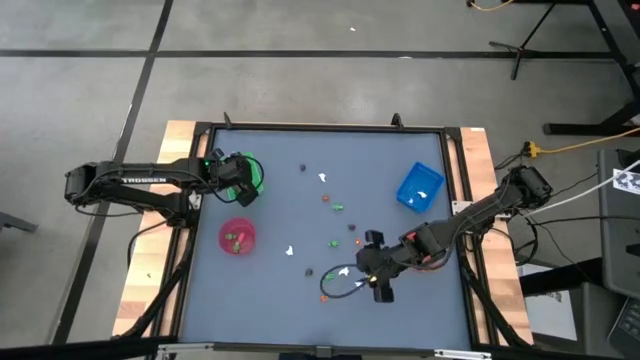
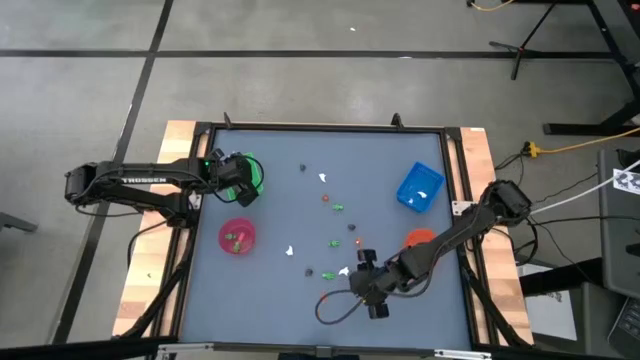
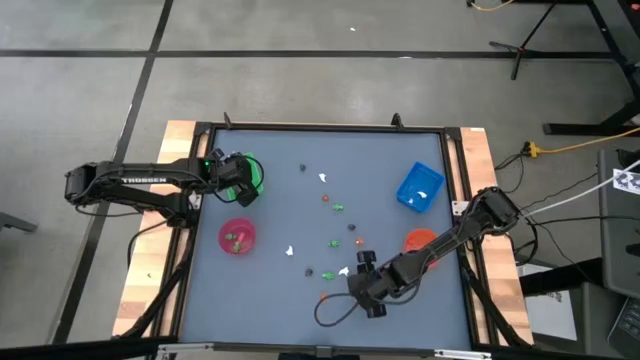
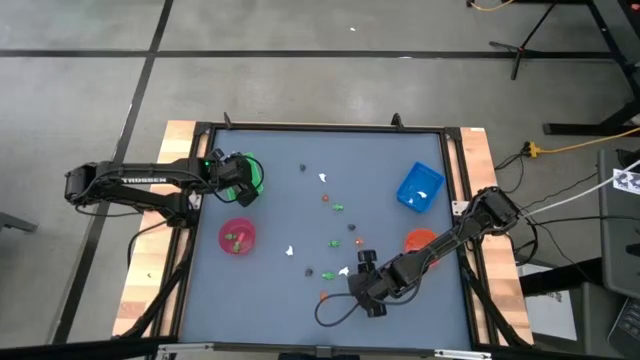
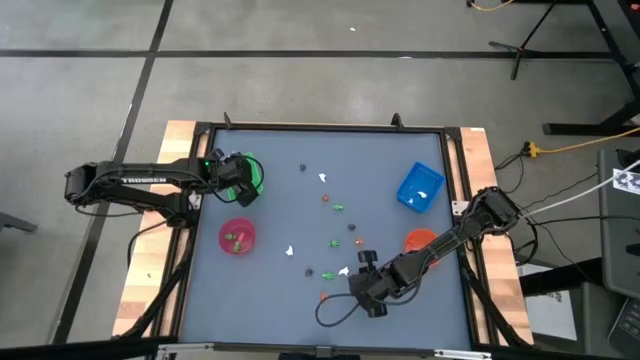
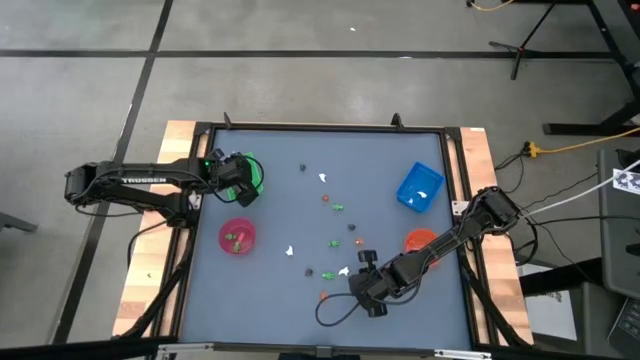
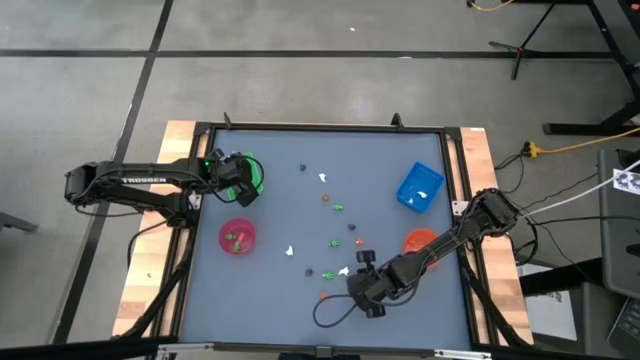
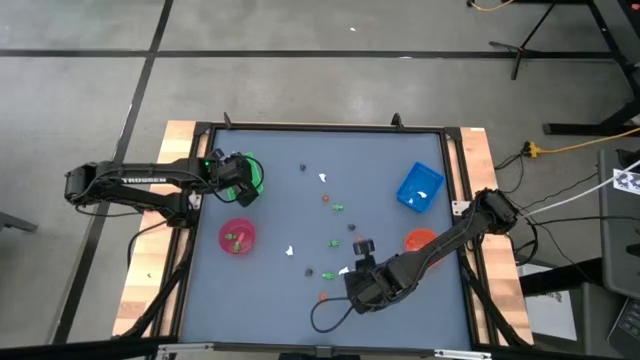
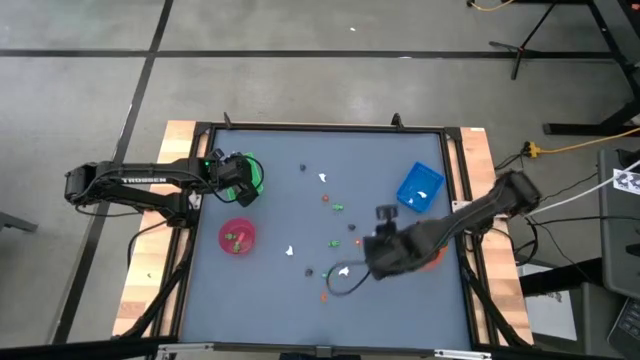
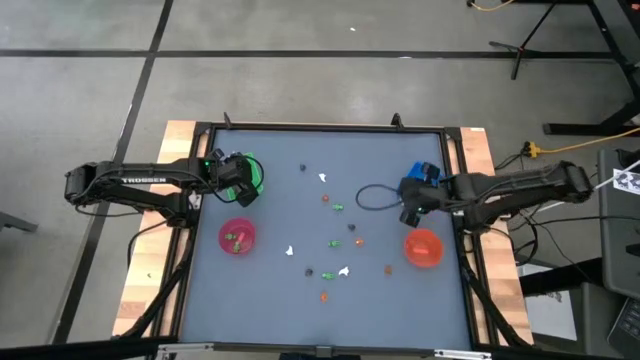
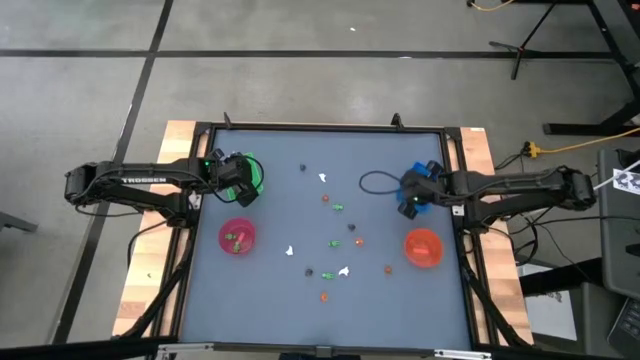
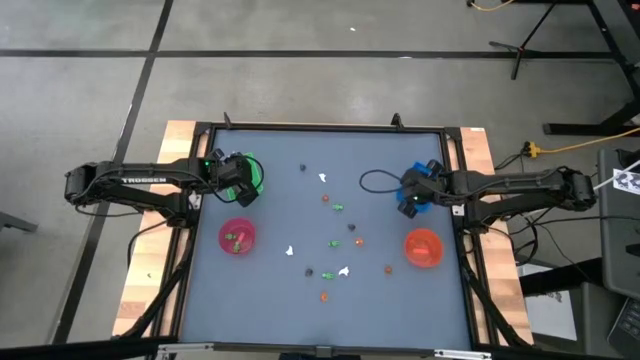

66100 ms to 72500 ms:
Task: Sort Halloween decoration
Put the small white ghost toy into the blue basket

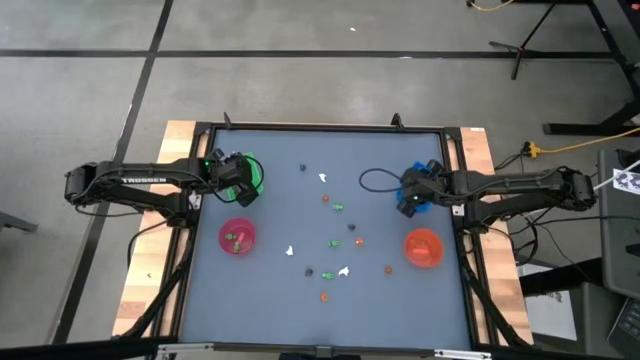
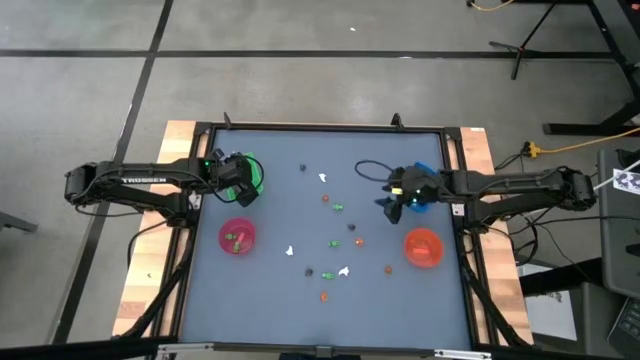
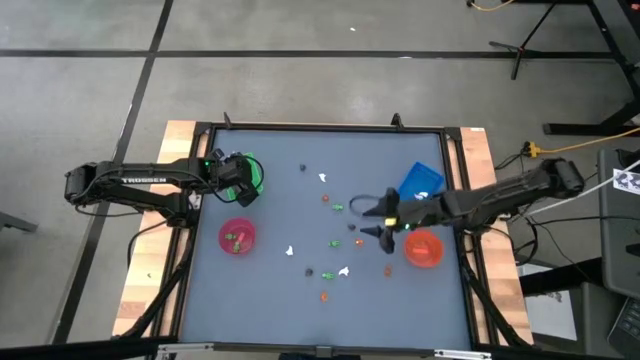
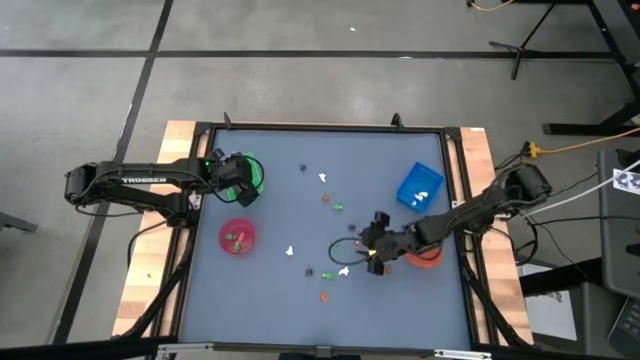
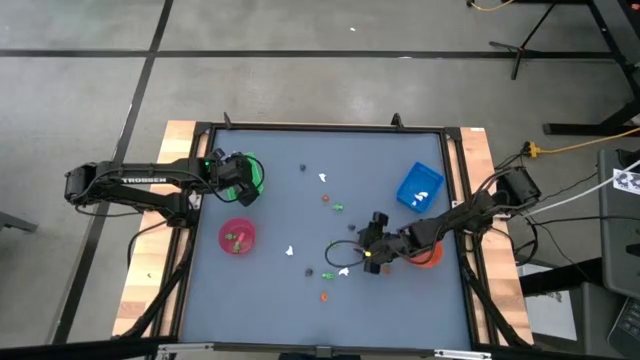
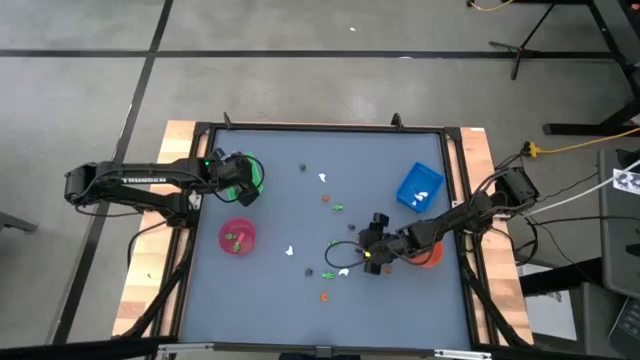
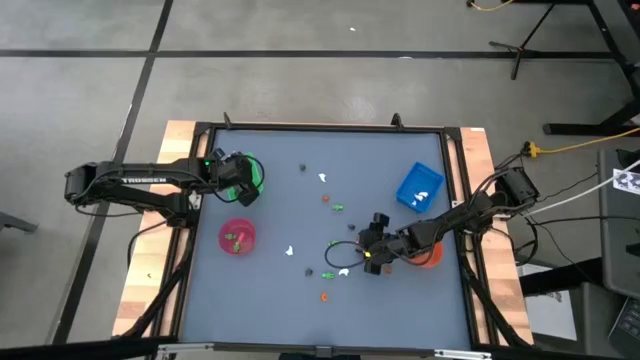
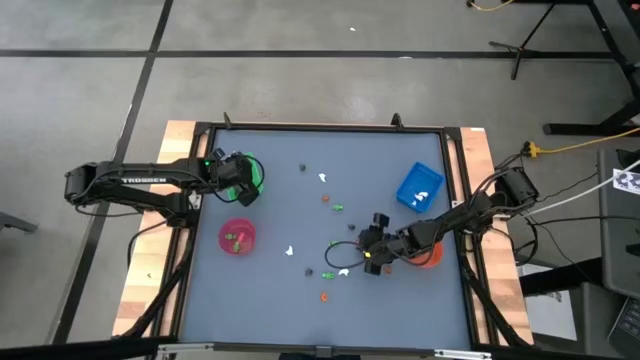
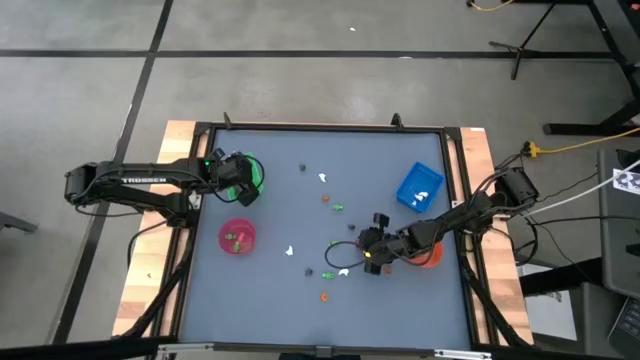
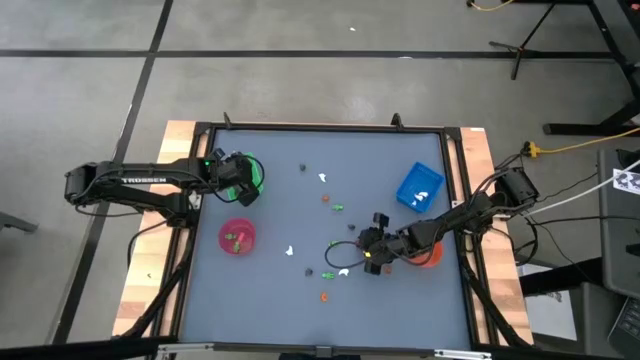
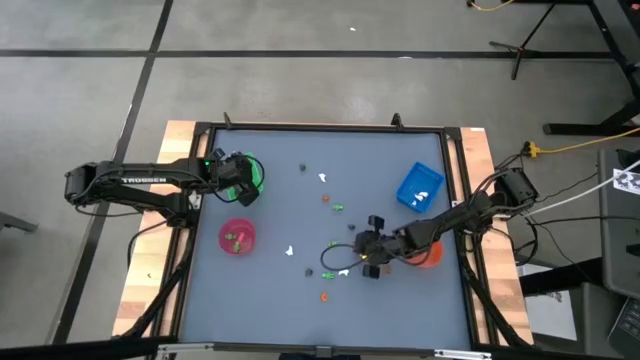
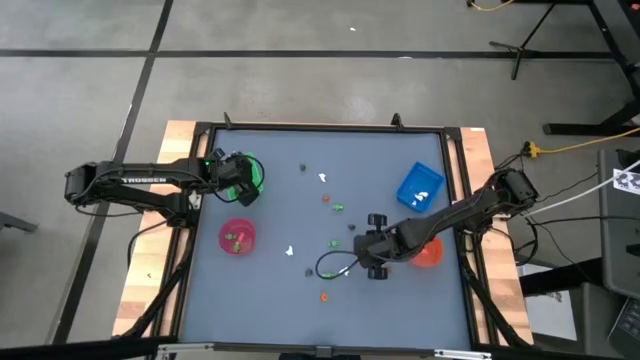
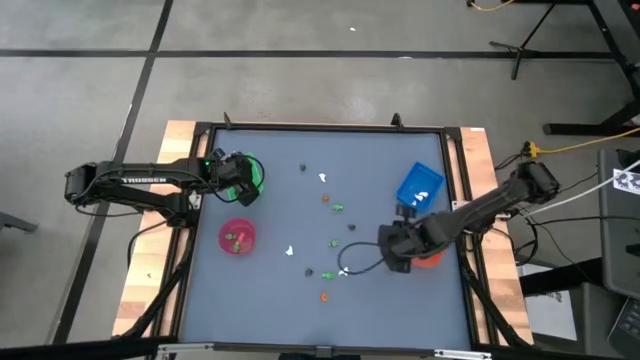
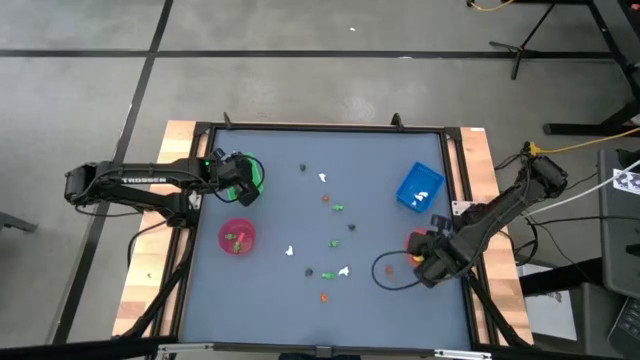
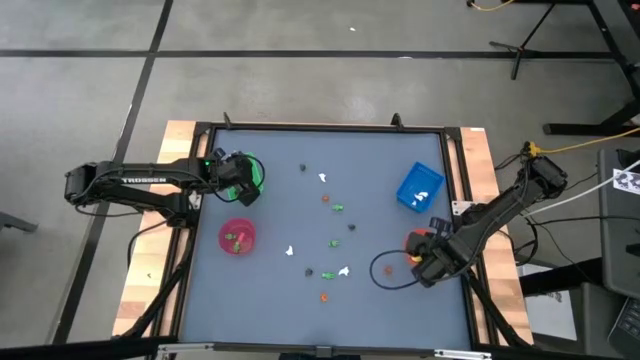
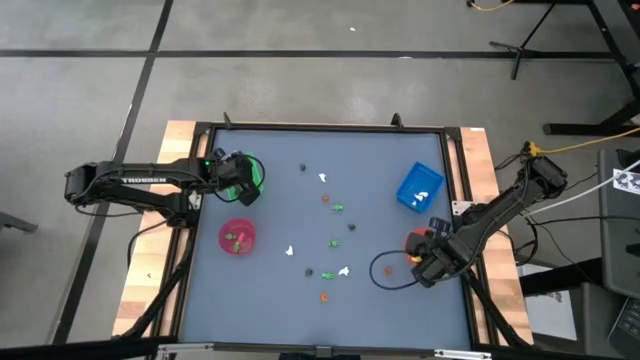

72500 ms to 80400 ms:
Put the small orange pumpkin toy into the transparent orange bowl

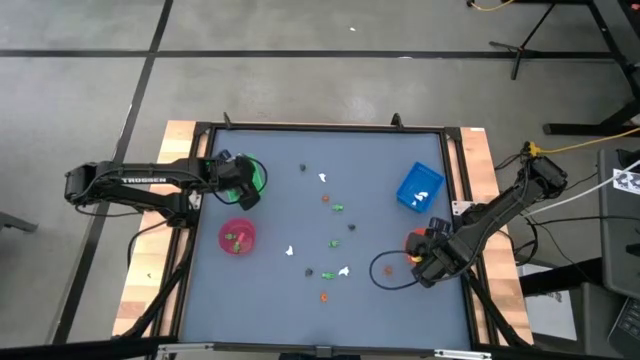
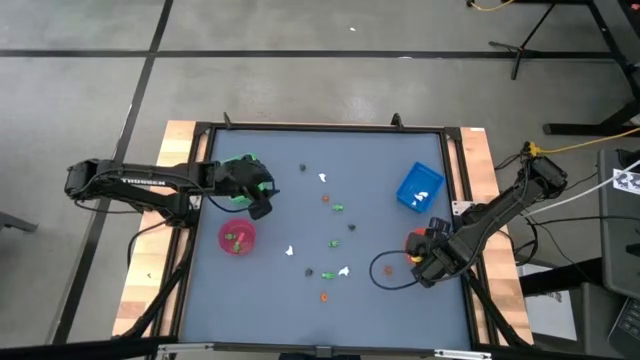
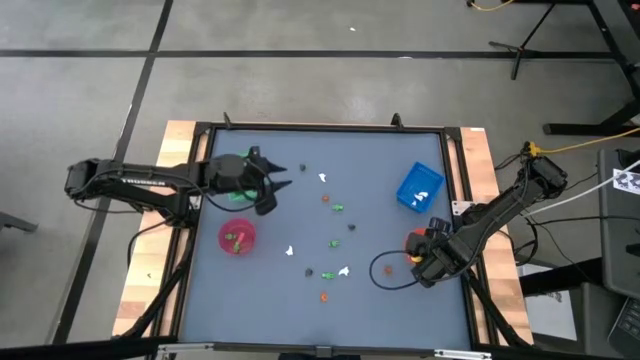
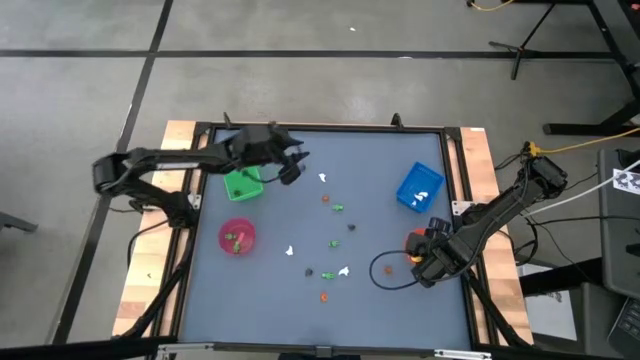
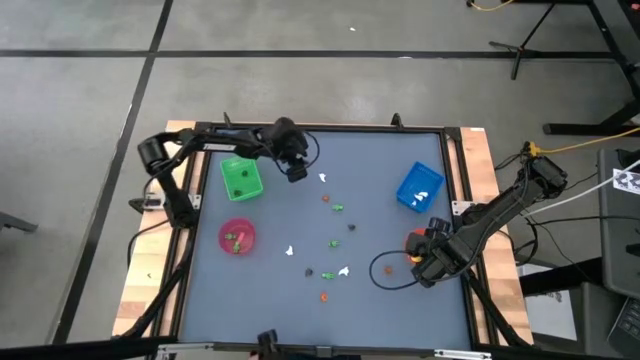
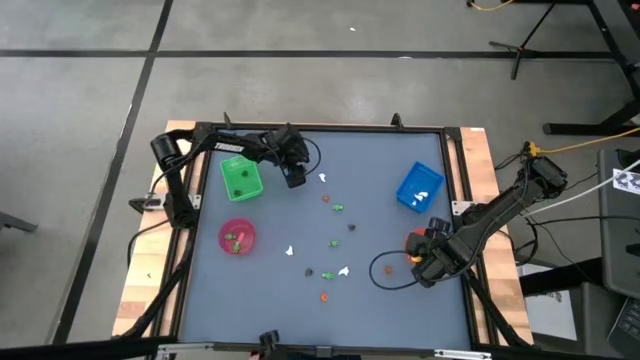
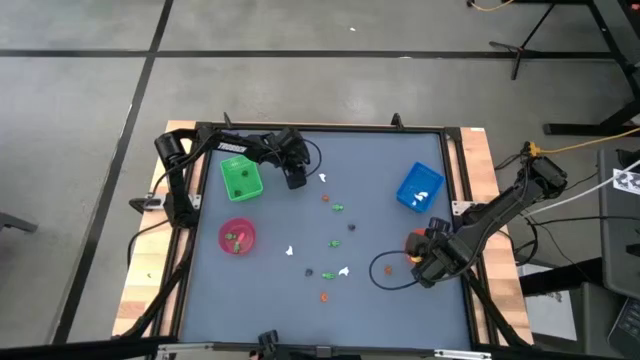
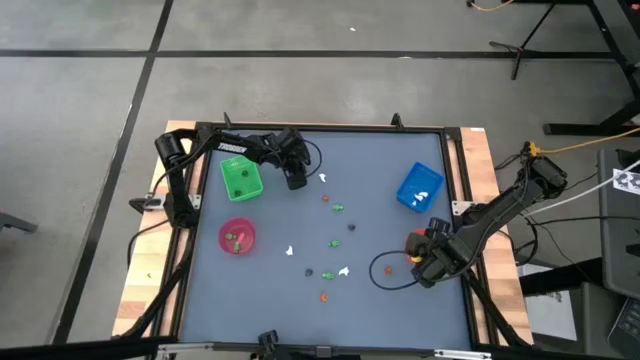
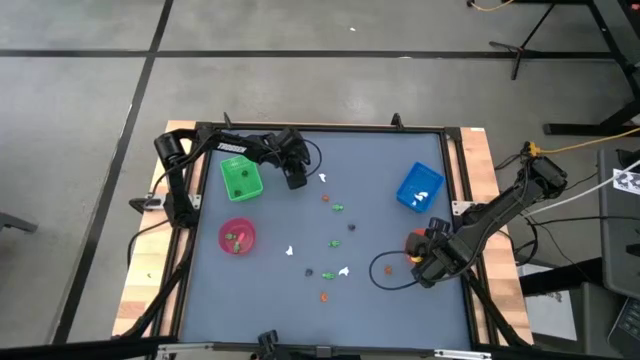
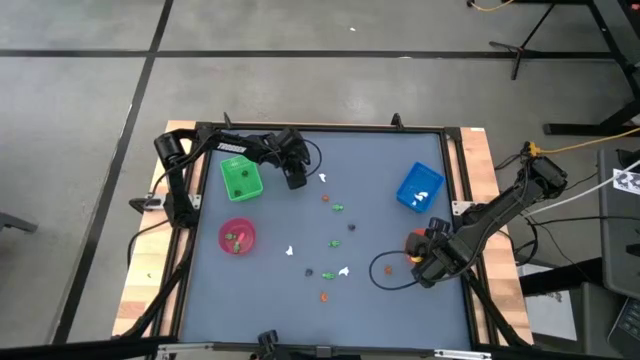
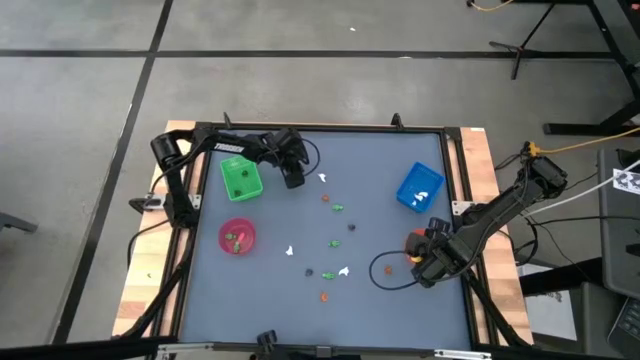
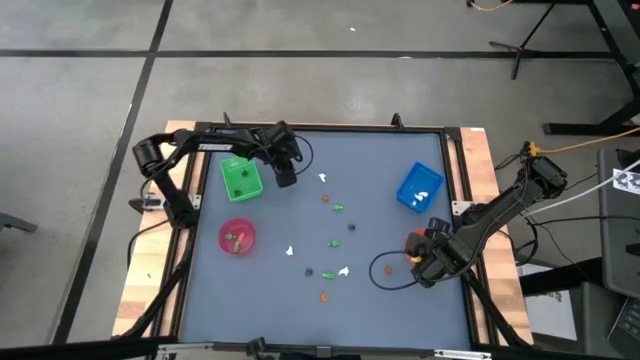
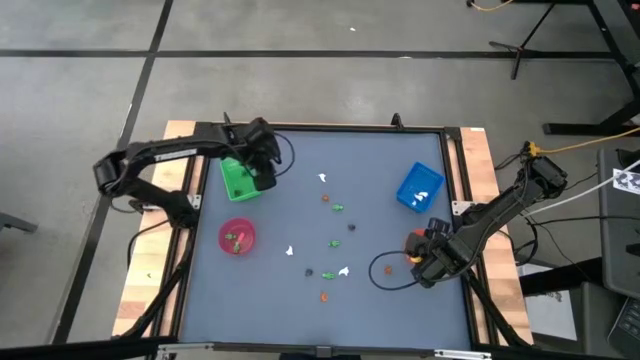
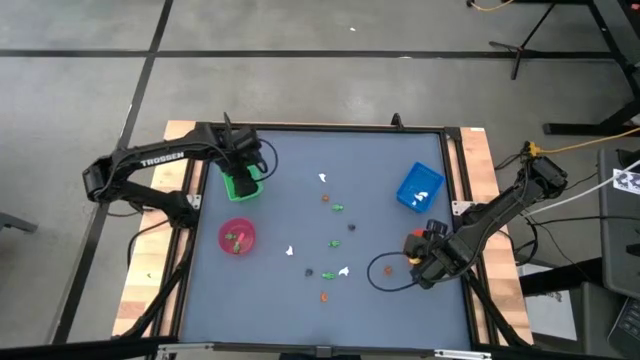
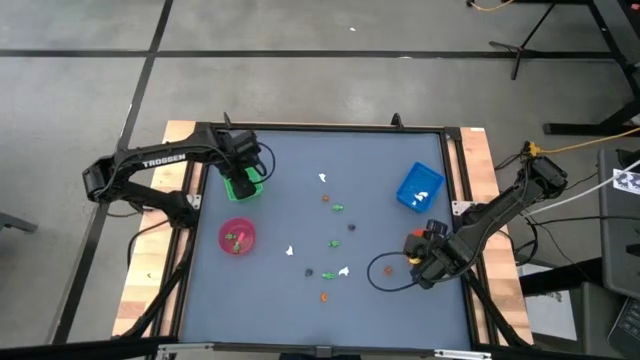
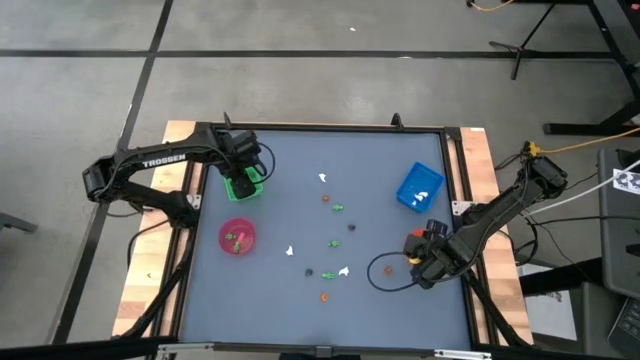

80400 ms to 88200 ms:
Put the small black skull toy into the green basket
